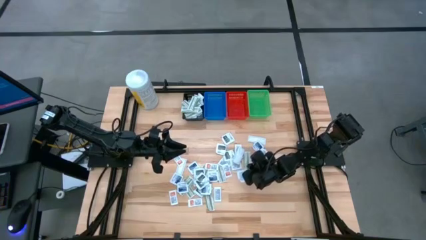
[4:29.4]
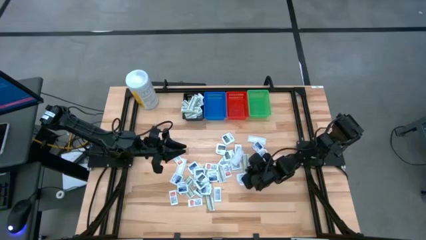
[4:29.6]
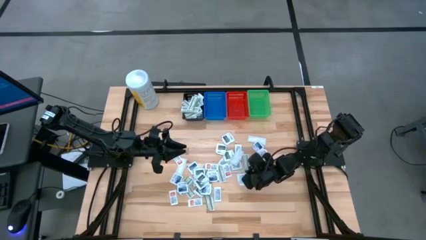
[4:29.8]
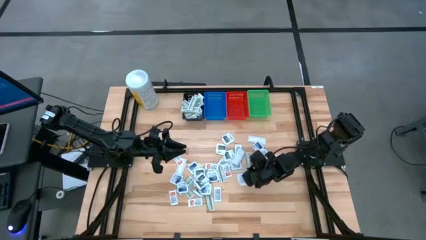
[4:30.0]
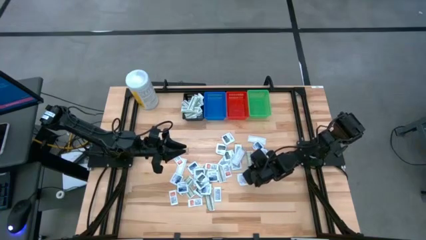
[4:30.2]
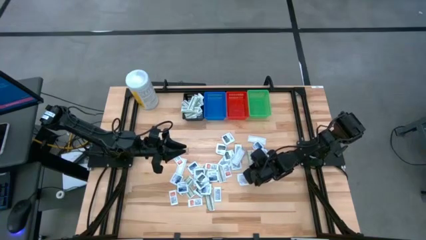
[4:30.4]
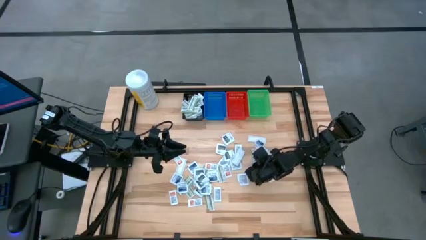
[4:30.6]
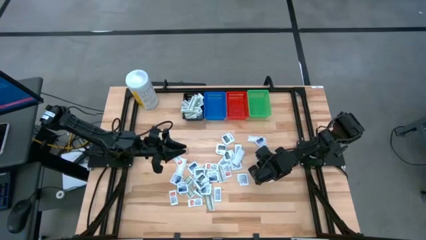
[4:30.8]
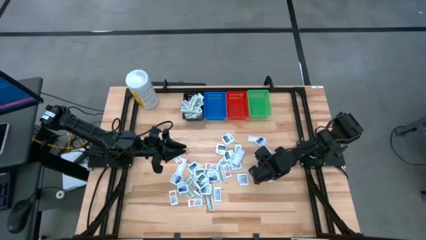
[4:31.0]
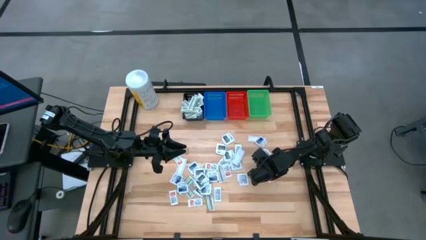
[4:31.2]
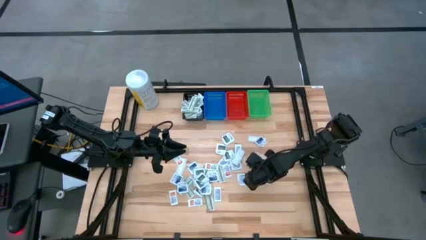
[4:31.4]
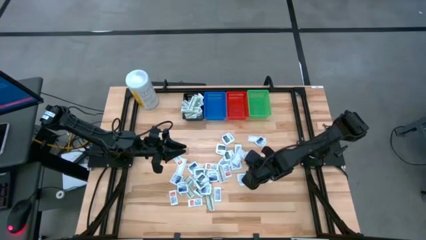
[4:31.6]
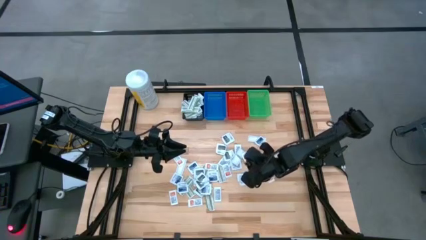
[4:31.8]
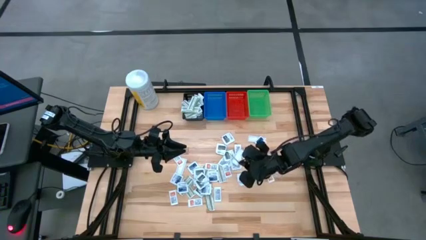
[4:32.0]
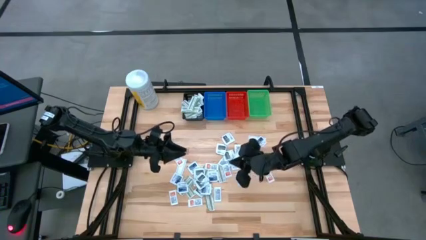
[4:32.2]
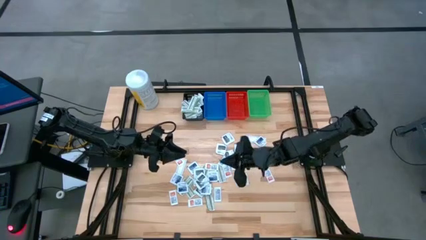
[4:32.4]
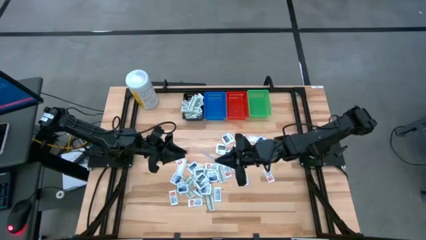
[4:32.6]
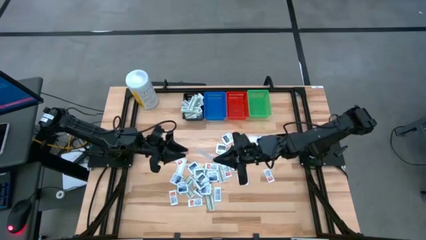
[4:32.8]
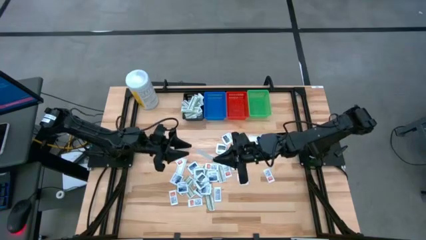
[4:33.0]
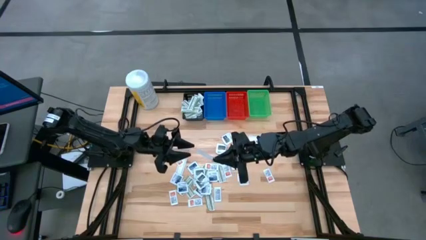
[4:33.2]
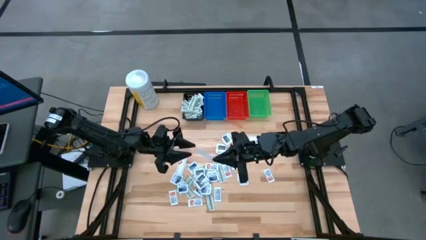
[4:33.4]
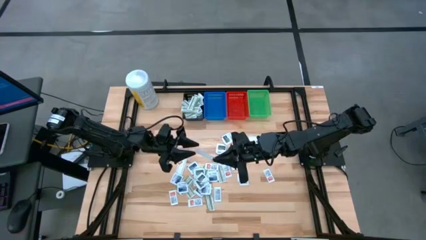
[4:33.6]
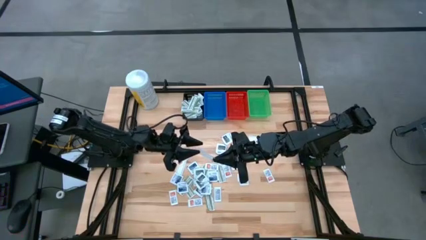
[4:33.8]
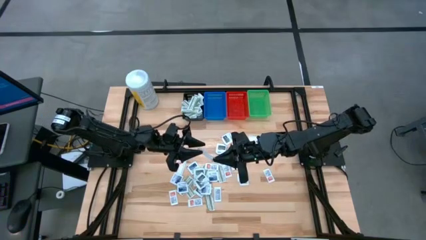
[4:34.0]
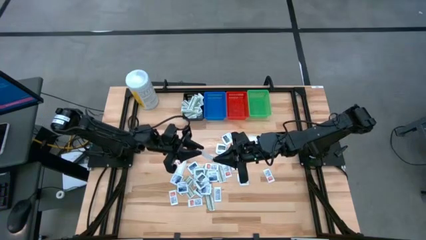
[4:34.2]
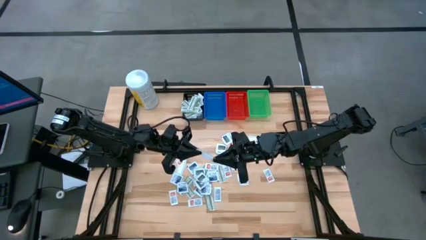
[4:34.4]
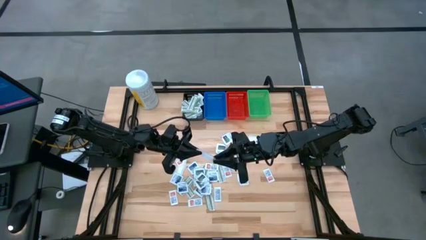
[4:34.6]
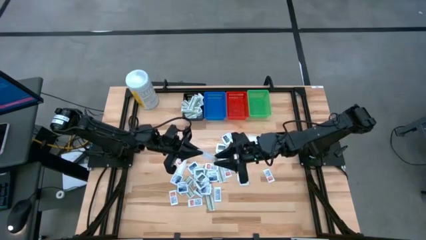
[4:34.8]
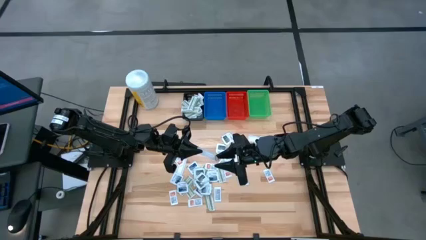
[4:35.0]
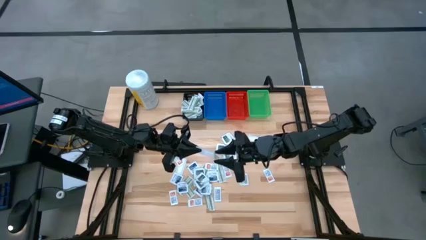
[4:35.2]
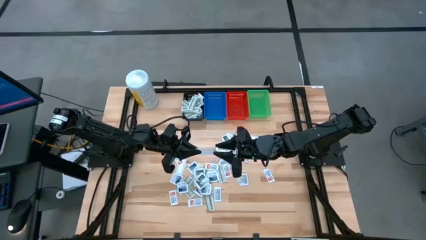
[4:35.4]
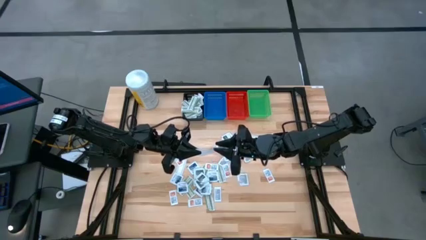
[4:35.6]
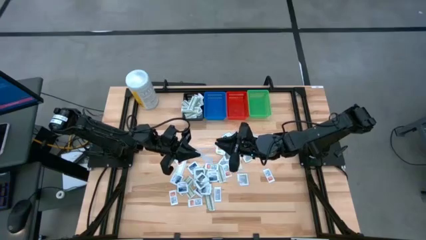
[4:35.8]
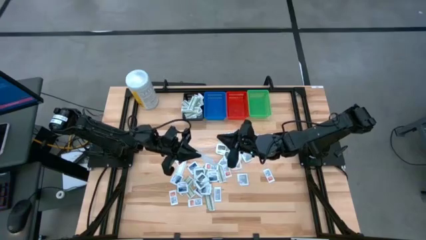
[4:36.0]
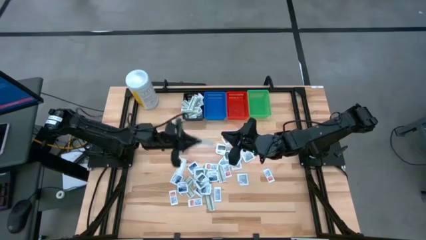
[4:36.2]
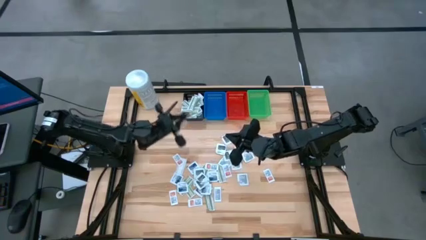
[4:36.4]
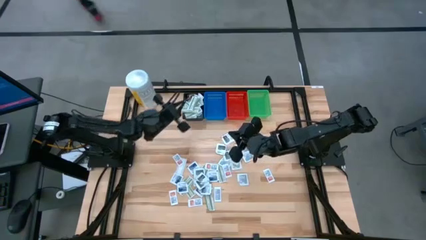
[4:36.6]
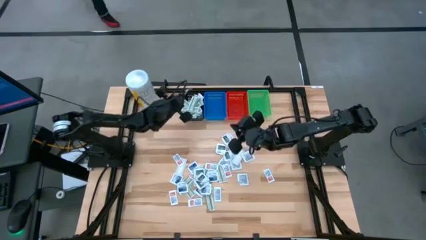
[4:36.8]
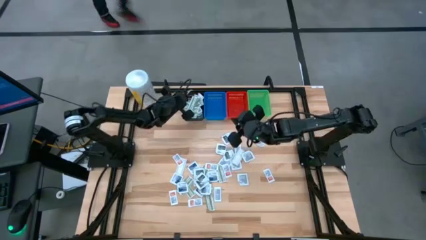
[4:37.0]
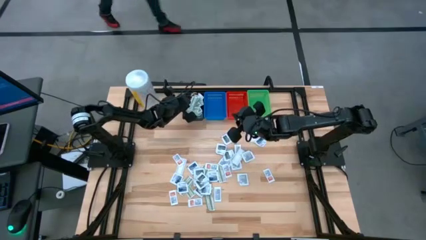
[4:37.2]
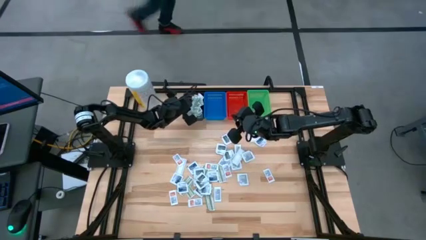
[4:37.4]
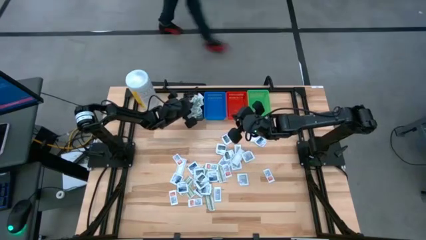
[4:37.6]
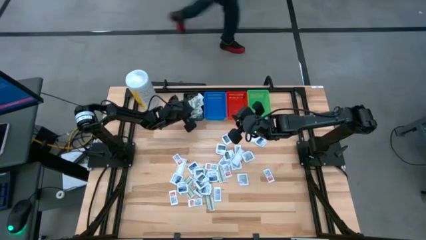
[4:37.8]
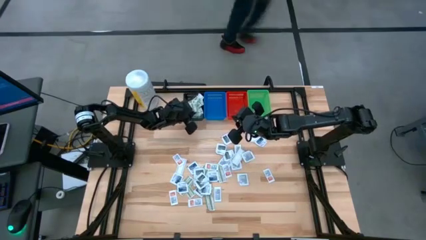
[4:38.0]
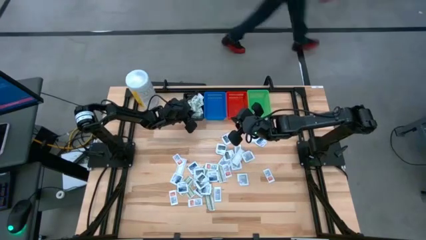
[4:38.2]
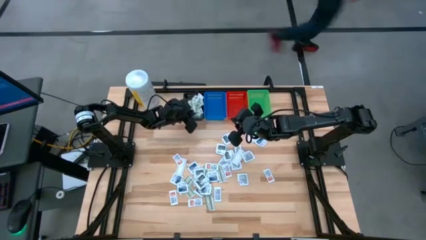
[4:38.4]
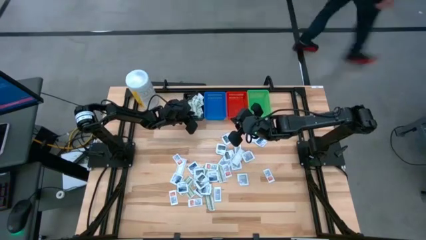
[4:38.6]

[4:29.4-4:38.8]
Task: Pick & Place First Aid Supplies
Put the green bandage pack in the black bin

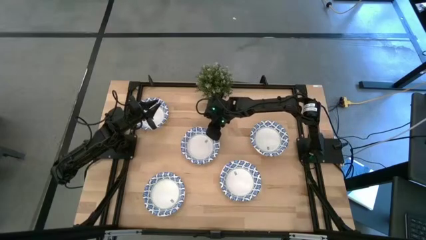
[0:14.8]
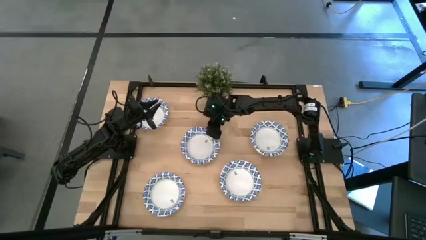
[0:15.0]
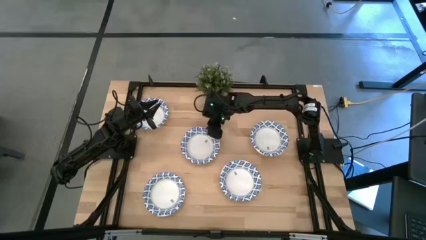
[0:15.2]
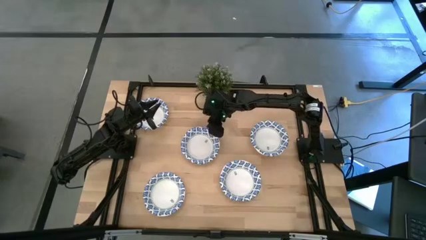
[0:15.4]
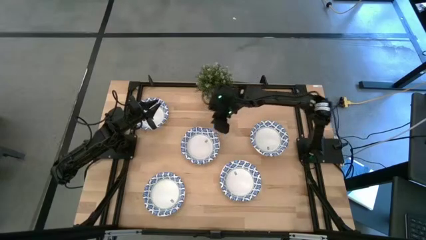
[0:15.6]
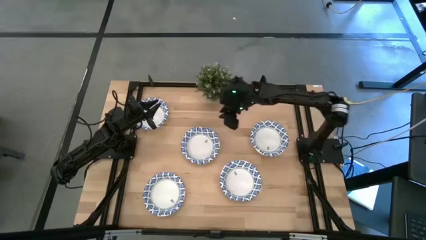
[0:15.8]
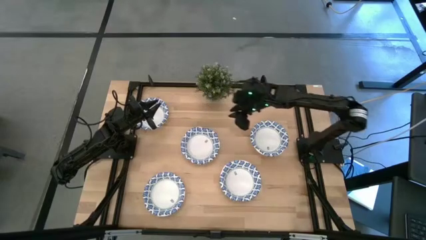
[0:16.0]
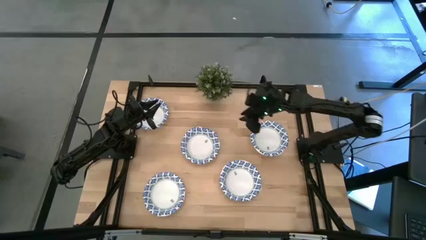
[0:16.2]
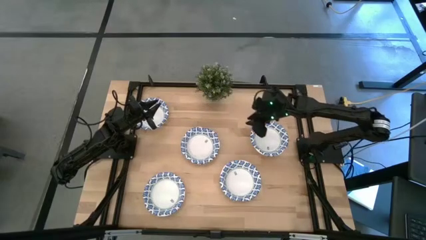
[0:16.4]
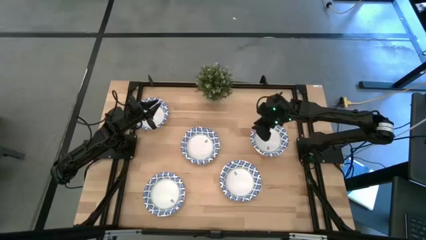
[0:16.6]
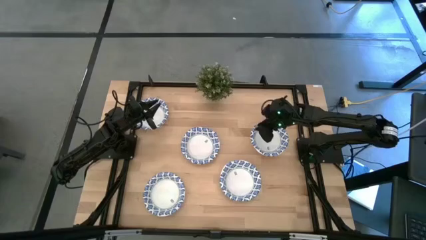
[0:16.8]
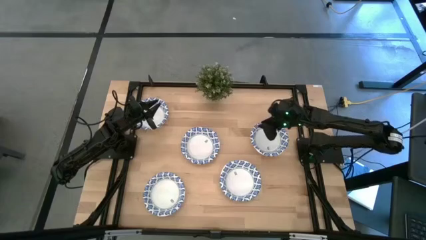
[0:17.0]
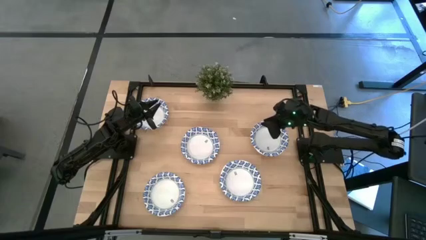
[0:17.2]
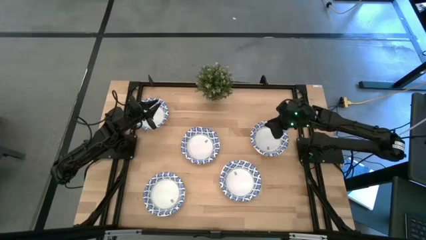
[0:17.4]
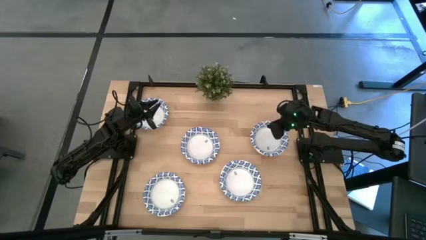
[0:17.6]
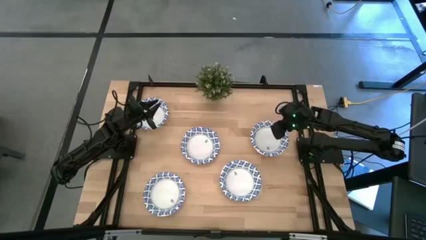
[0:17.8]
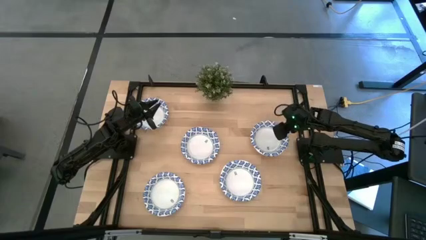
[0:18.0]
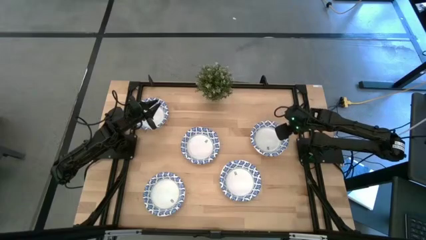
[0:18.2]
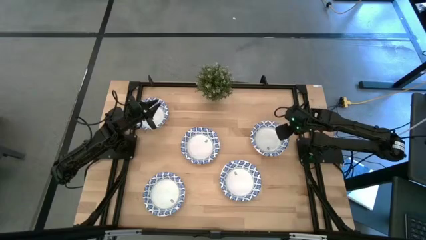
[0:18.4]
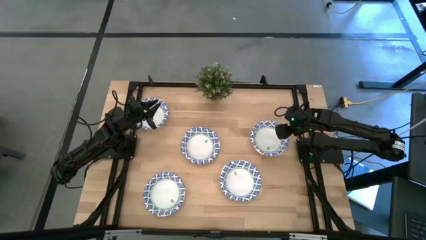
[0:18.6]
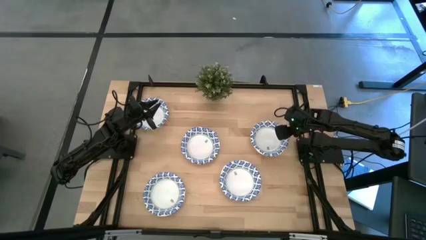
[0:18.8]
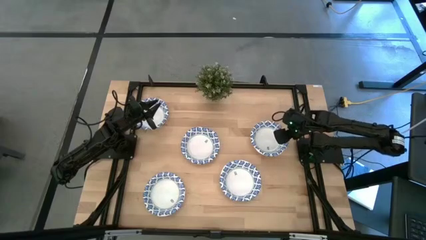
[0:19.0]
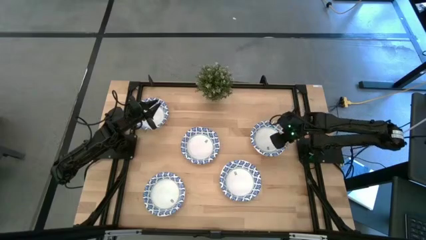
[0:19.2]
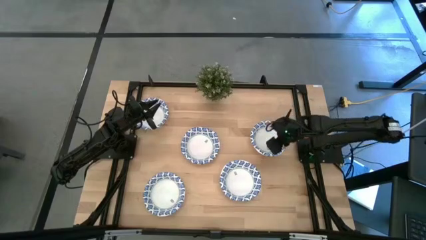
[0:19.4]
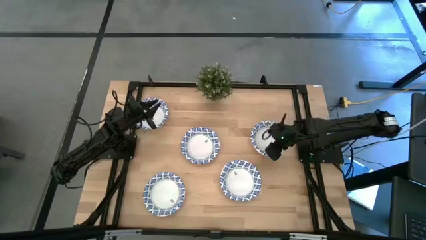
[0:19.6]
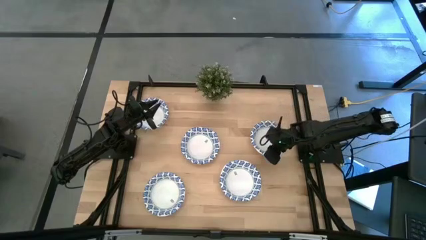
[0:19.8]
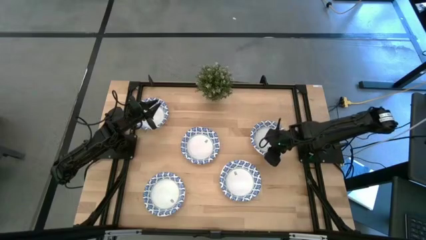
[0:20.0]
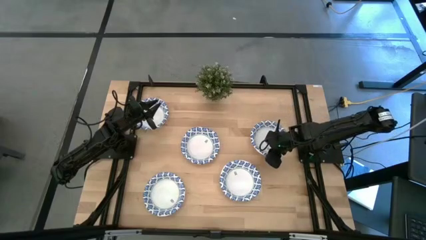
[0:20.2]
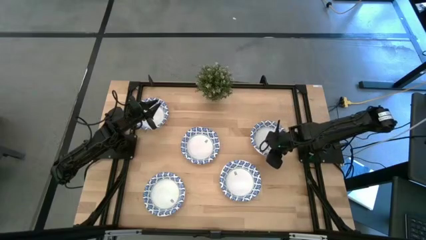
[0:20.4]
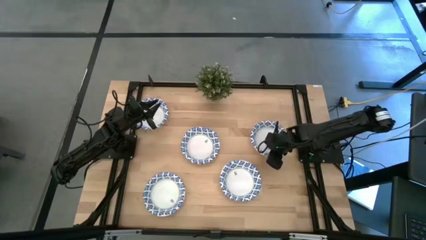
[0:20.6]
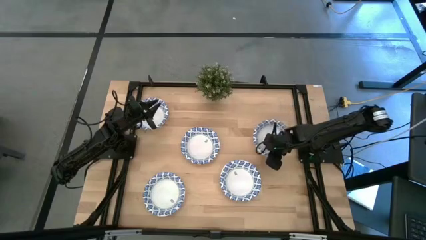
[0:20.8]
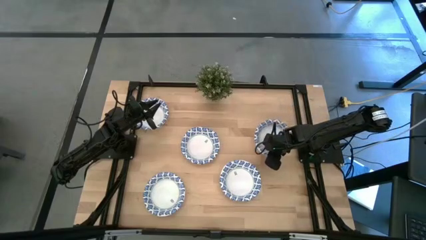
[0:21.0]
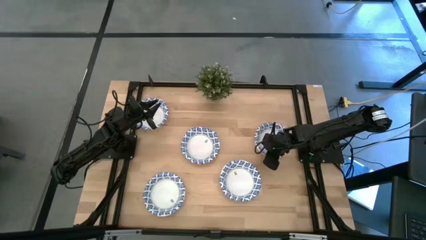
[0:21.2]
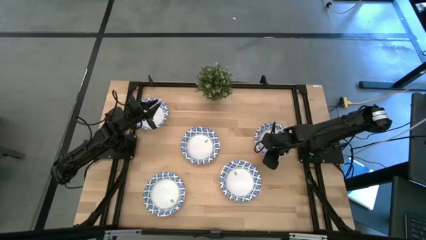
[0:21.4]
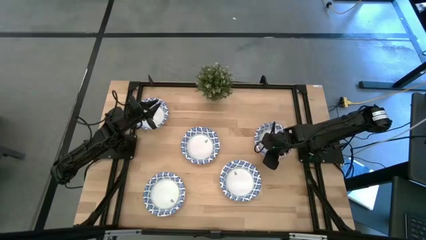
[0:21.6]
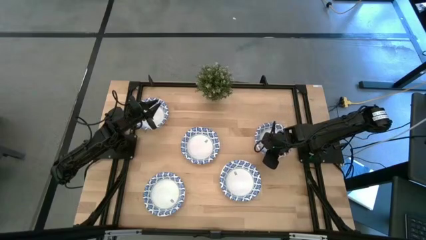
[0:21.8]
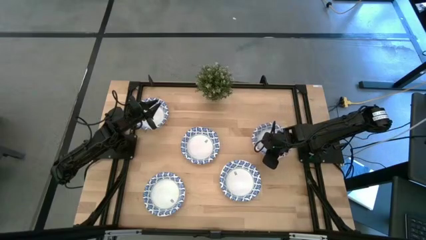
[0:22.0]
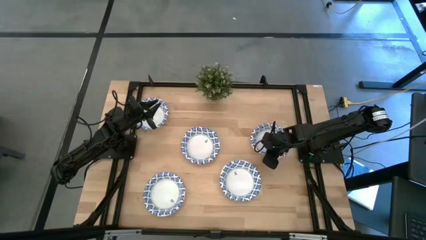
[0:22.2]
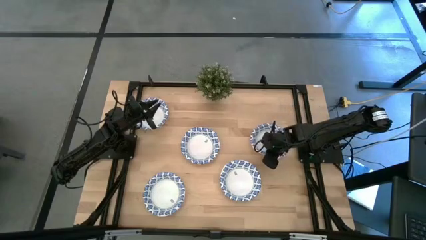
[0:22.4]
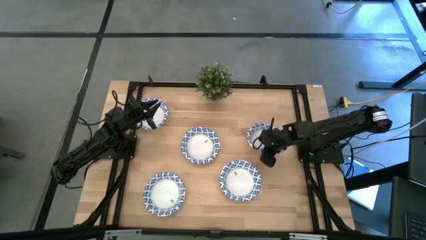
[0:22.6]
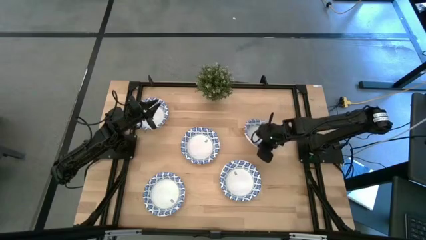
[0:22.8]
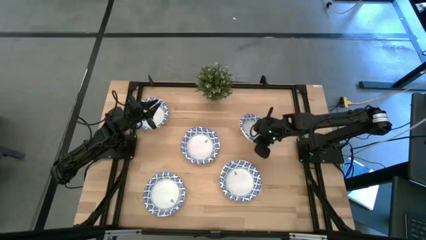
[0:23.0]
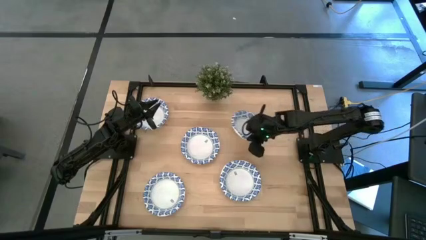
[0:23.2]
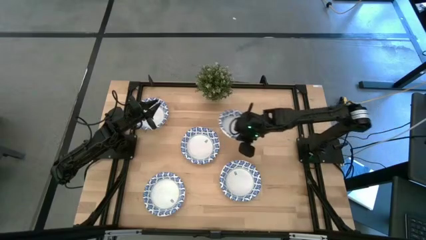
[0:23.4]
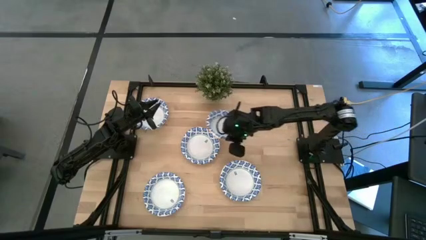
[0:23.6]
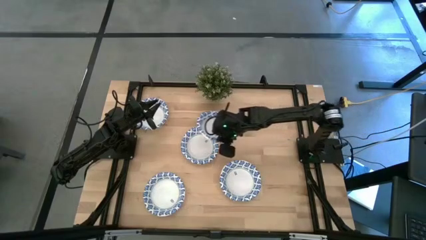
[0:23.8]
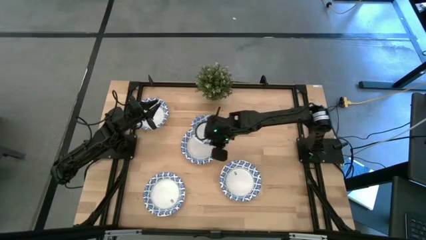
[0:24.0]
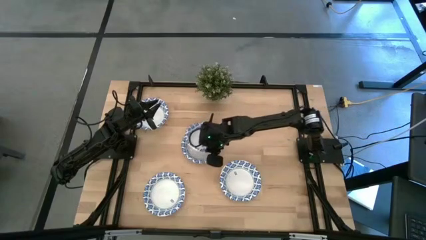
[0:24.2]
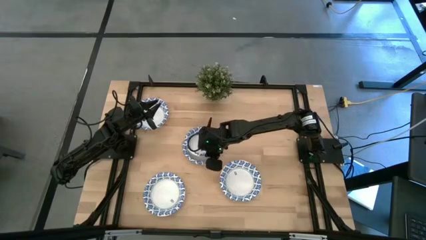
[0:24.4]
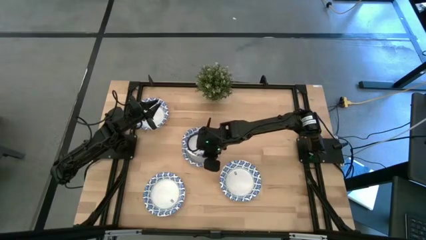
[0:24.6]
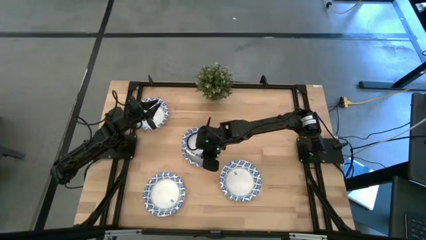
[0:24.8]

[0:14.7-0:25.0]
Task: Nest bowls inside each other
Stack the white bowl on the stacked white bowls
